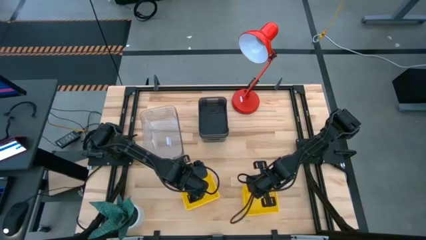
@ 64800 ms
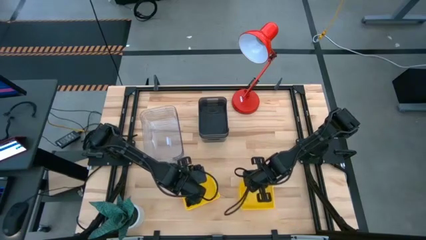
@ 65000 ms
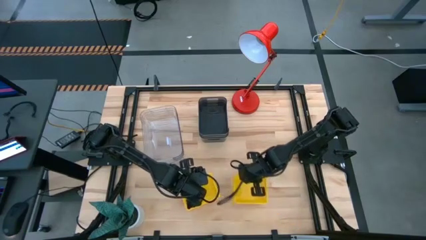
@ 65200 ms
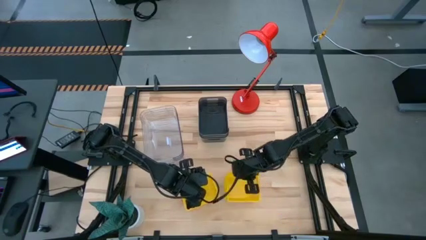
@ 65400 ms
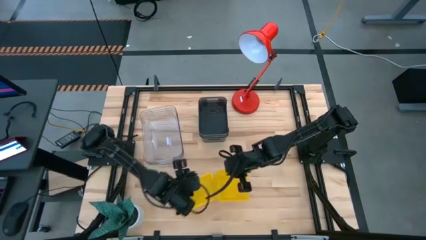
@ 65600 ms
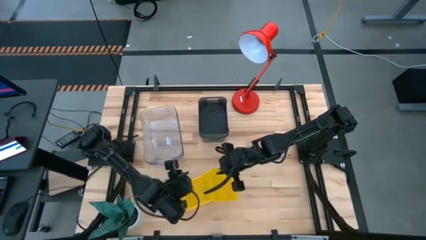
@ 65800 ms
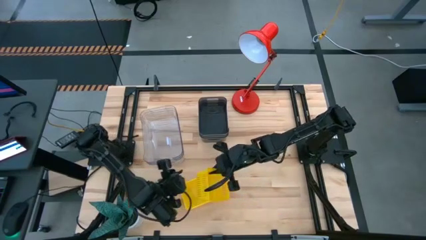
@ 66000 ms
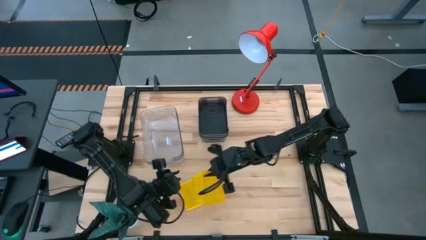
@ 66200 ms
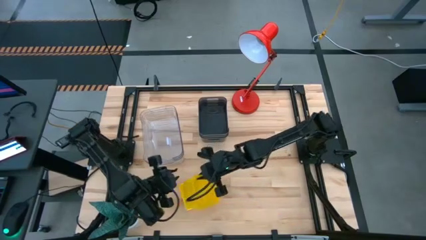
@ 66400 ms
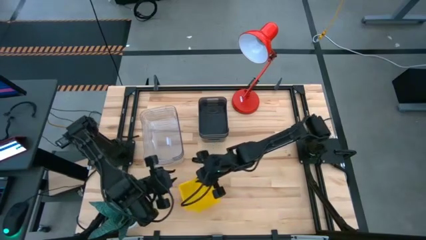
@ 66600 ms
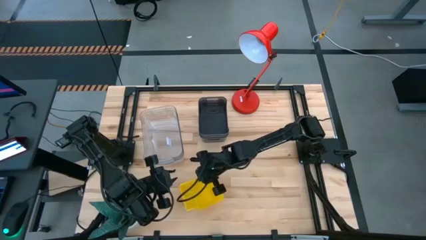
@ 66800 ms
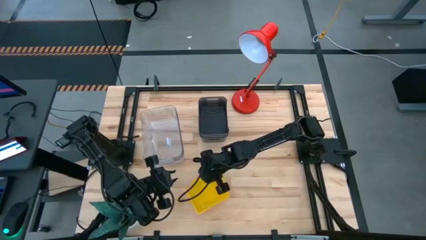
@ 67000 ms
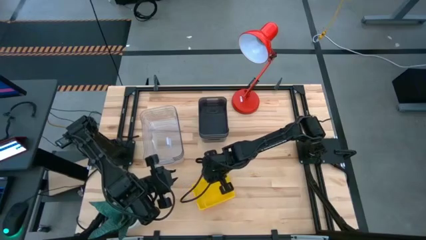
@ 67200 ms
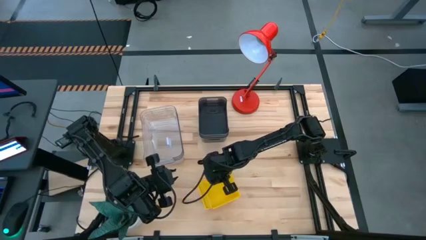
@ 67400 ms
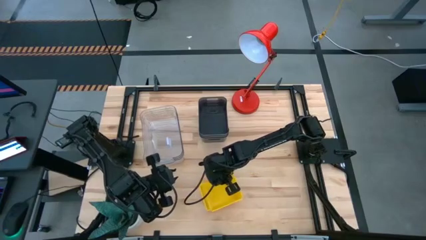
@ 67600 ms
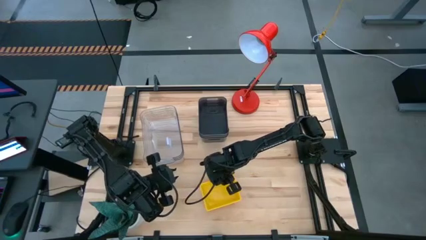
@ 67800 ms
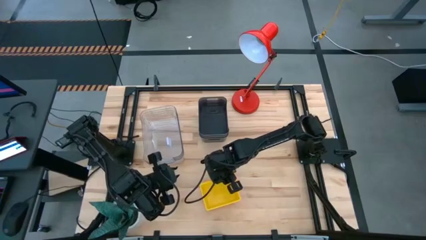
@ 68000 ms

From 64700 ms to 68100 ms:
Stack the right yellow bin on top of the left yellow bin

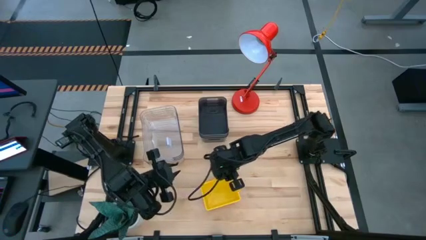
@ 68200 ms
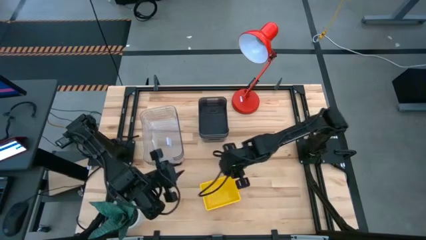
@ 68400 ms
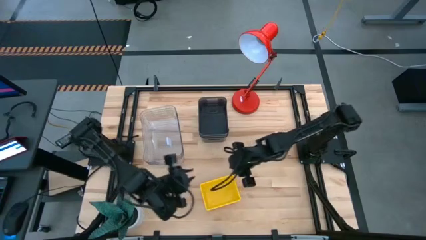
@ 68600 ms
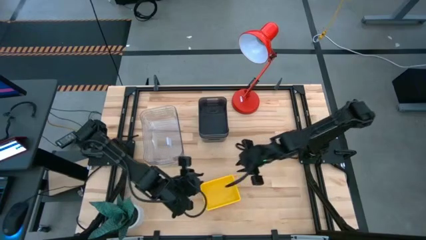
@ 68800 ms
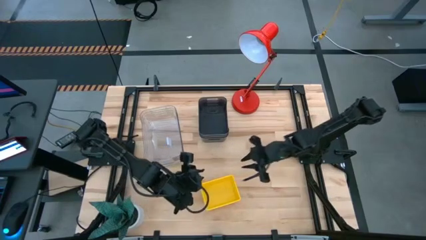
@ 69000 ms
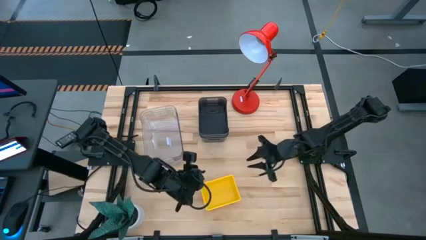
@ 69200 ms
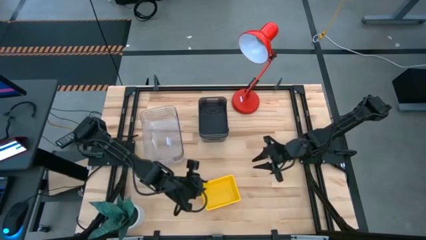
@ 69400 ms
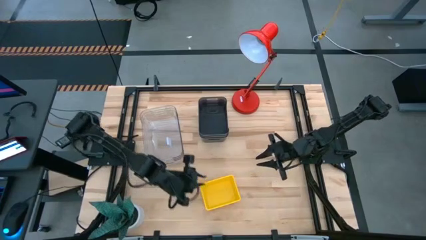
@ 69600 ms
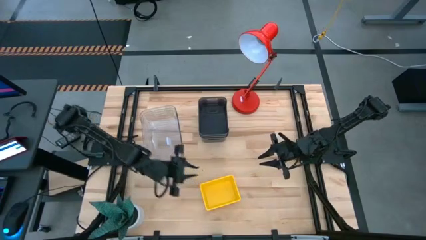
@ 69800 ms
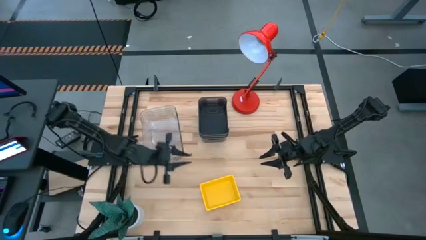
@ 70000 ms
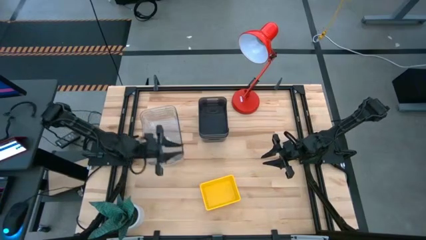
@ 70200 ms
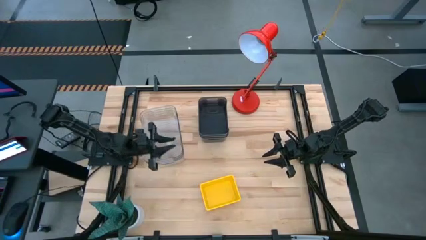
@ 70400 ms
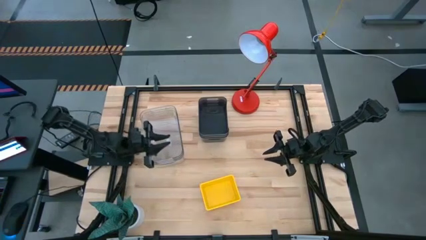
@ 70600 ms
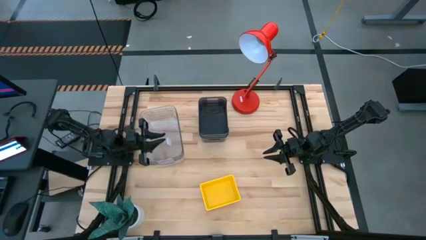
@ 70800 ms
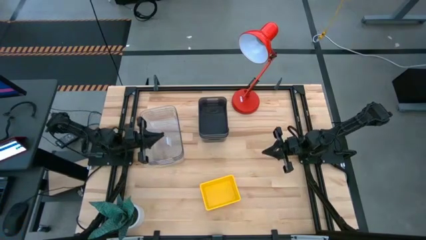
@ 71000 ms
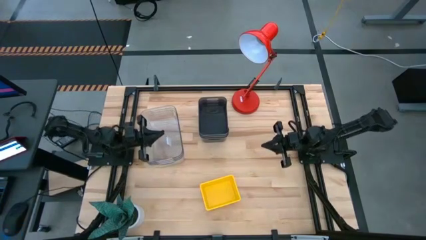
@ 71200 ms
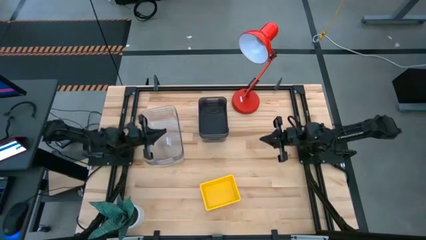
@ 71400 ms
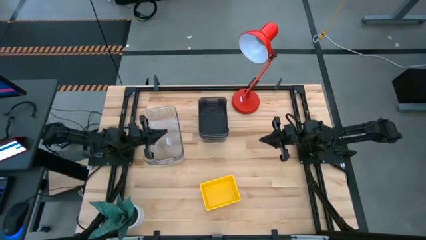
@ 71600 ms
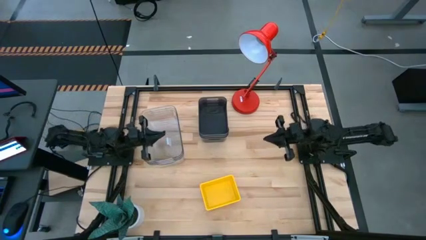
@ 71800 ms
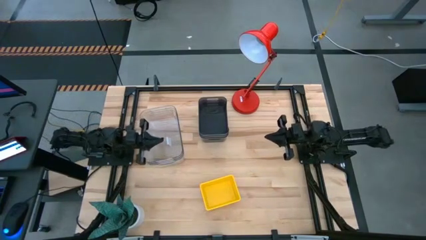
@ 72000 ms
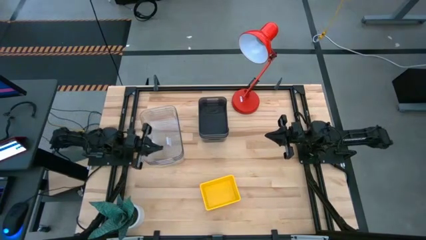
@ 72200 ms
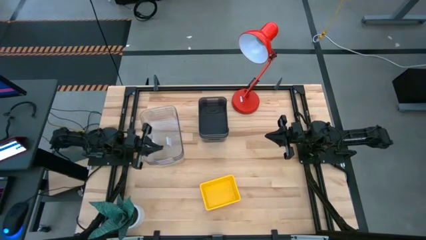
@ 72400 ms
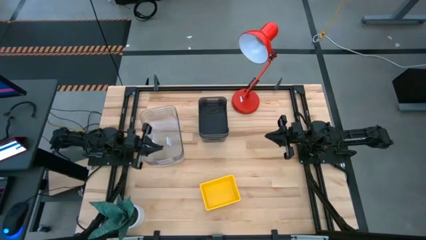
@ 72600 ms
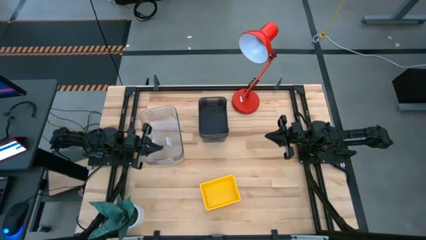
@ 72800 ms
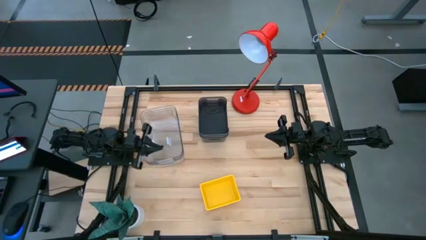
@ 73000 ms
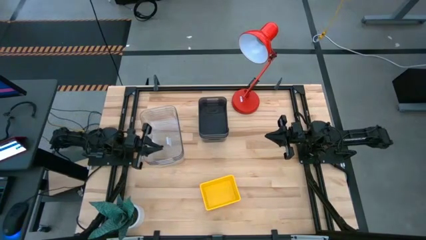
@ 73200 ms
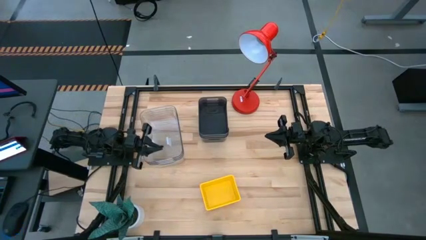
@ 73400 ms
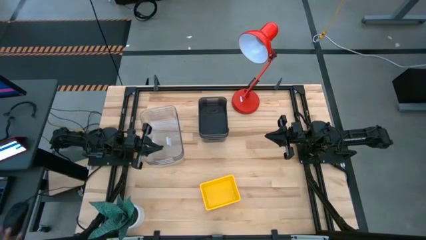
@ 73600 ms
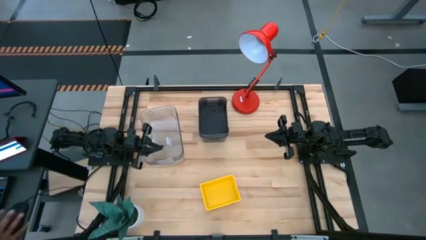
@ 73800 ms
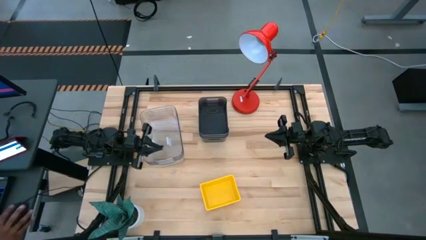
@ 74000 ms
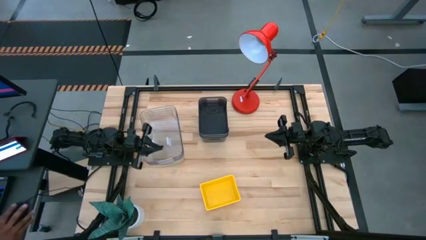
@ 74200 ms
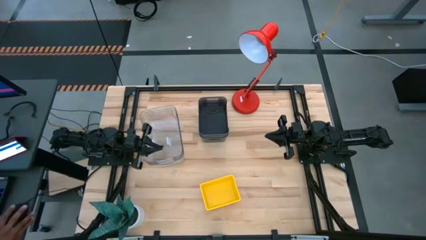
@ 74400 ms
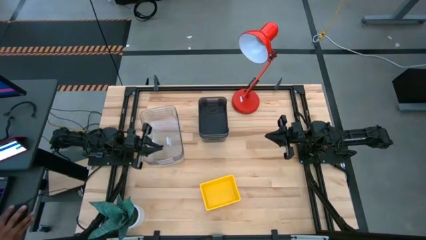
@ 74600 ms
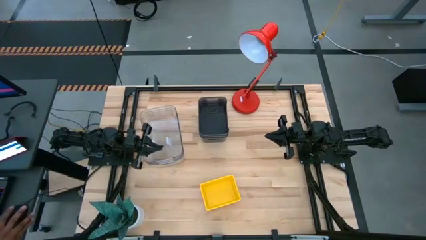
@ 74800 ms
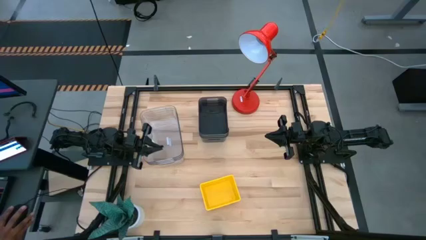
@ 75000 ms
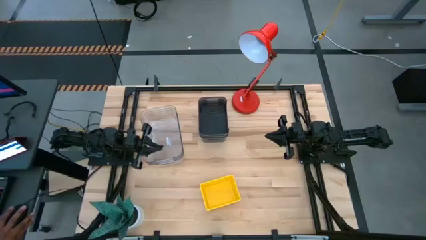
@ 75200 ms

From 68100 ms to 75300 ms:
Return to Home Position
